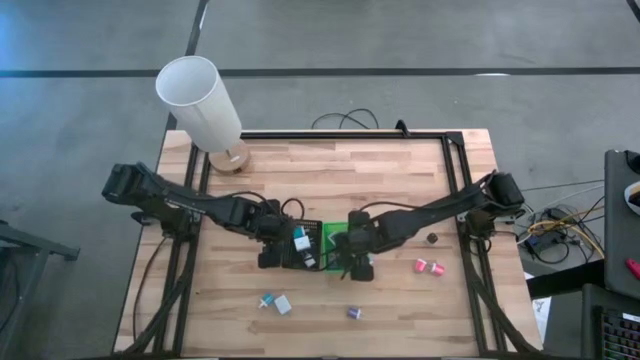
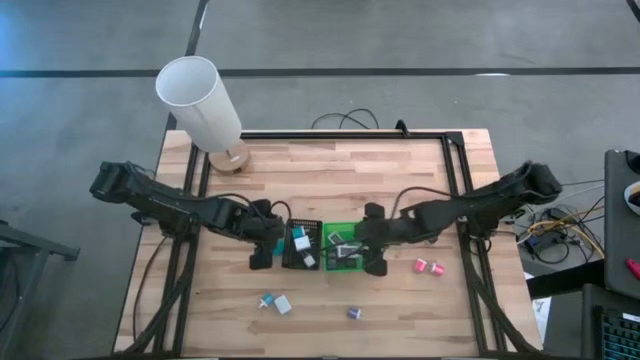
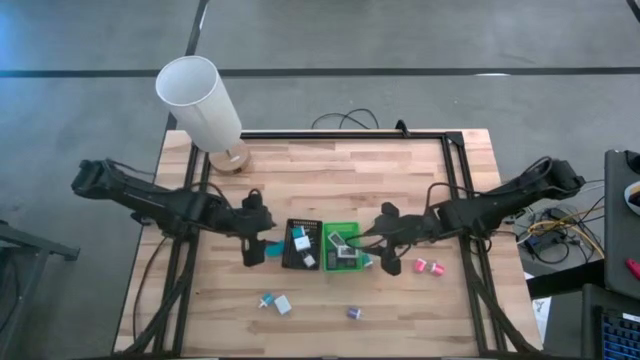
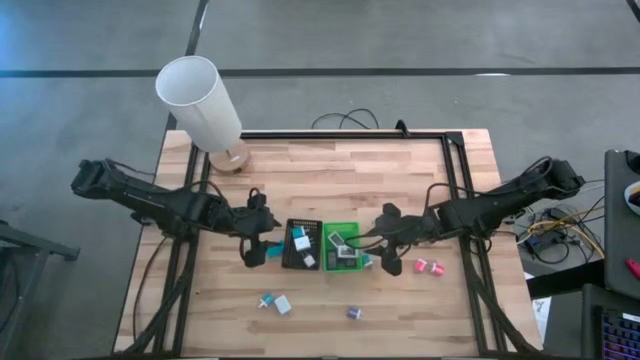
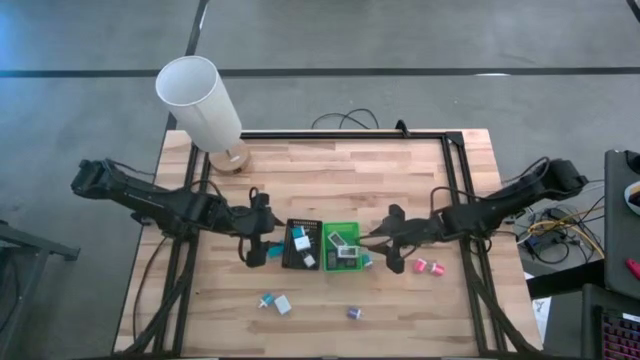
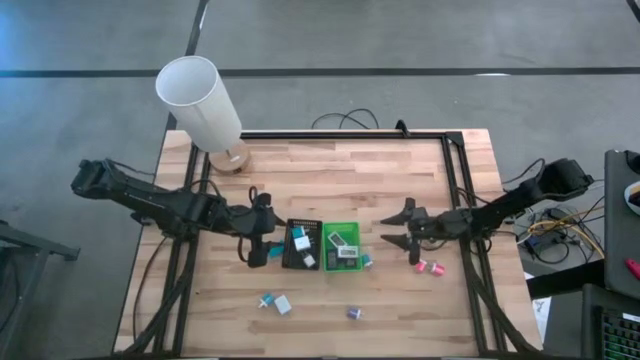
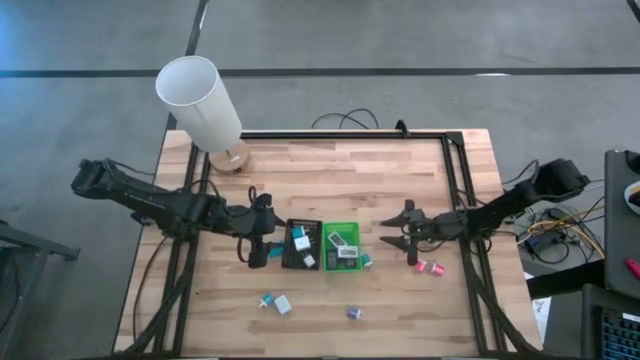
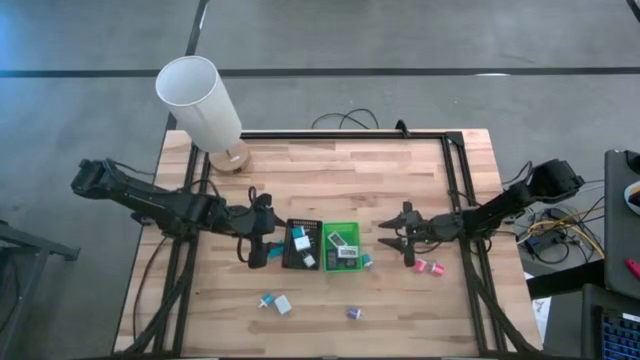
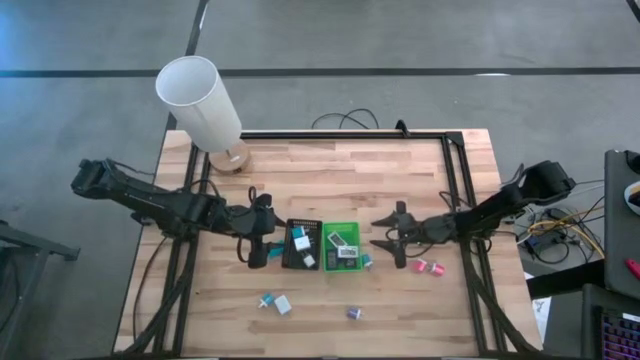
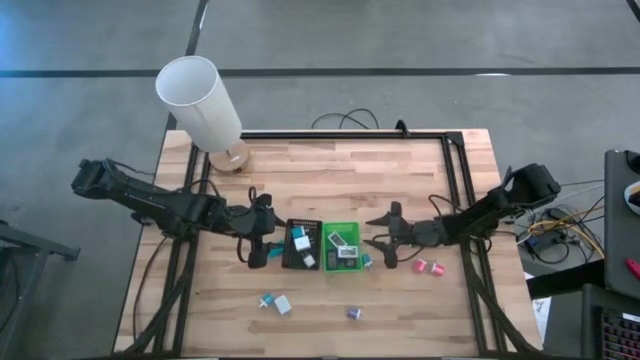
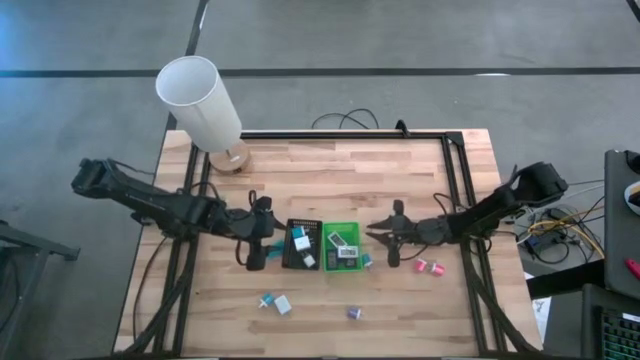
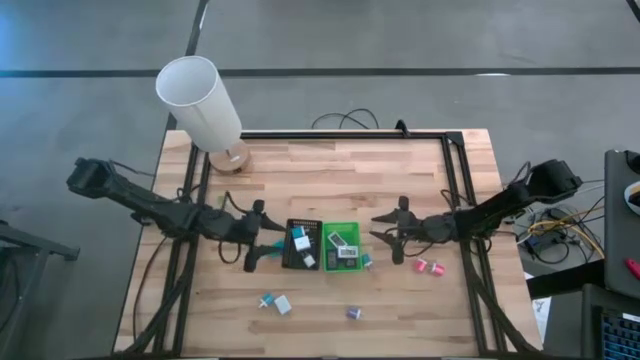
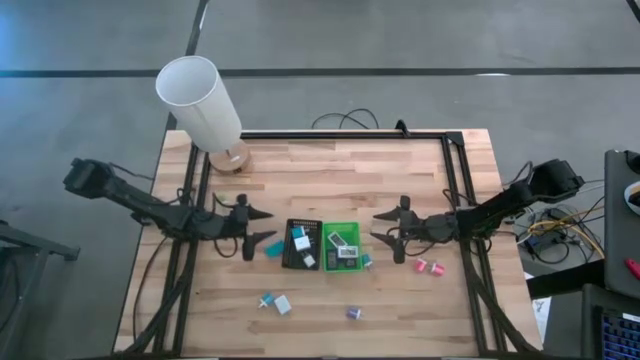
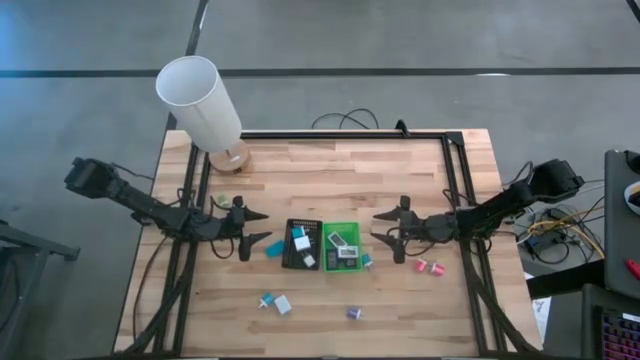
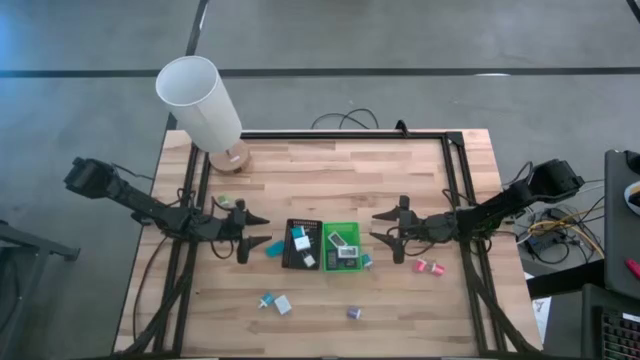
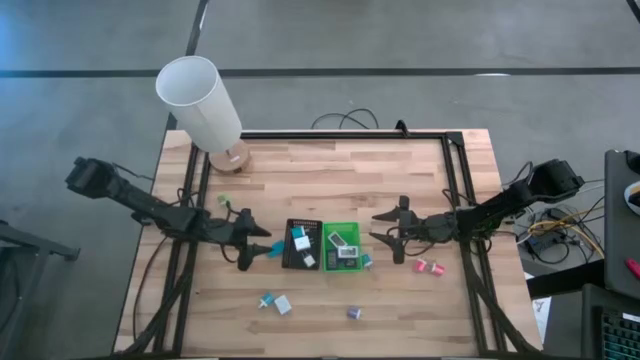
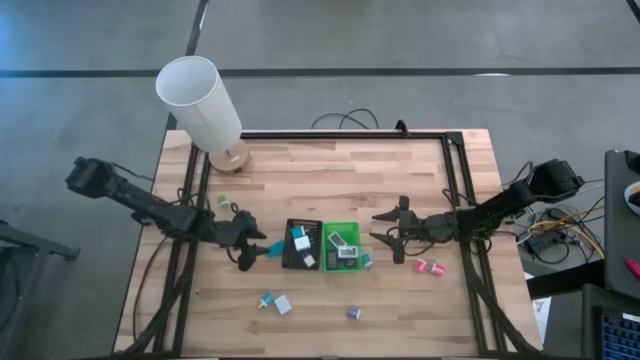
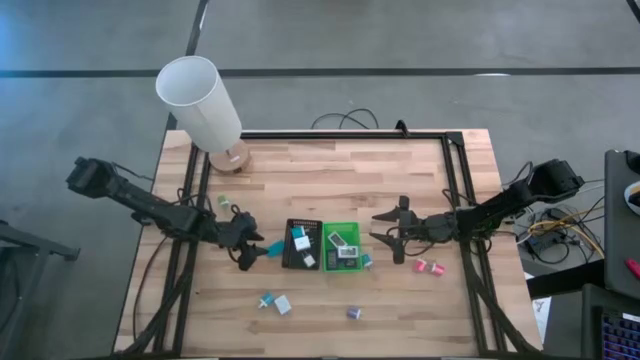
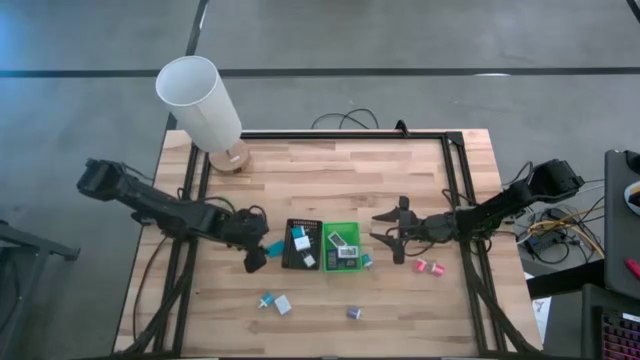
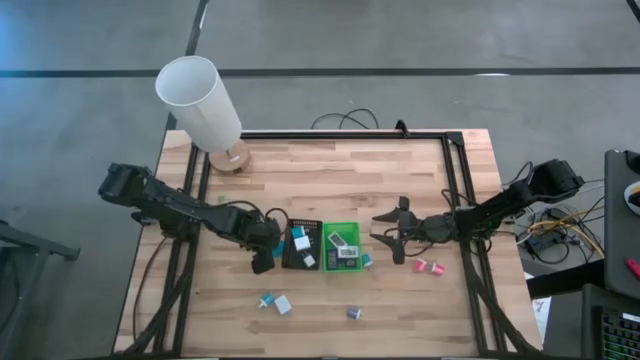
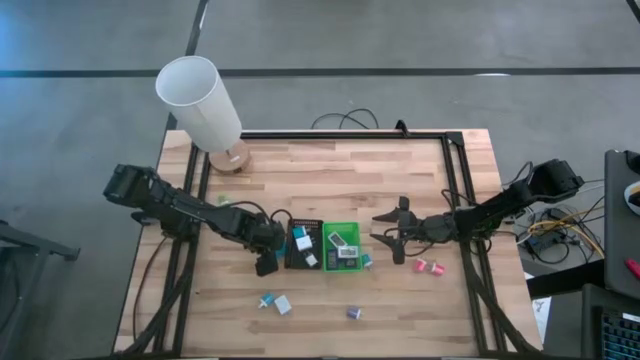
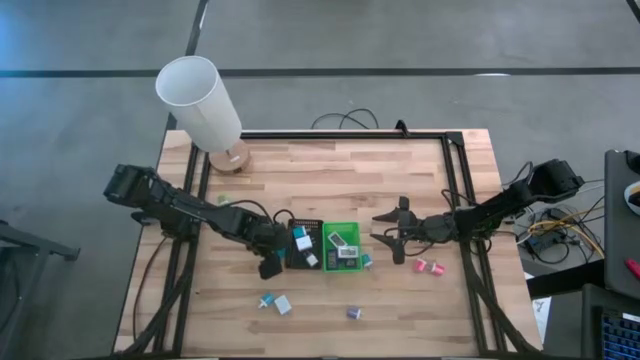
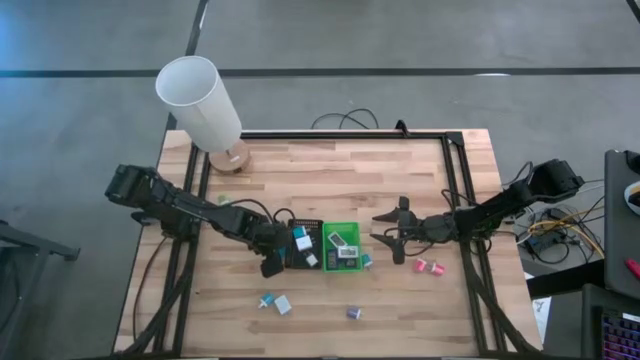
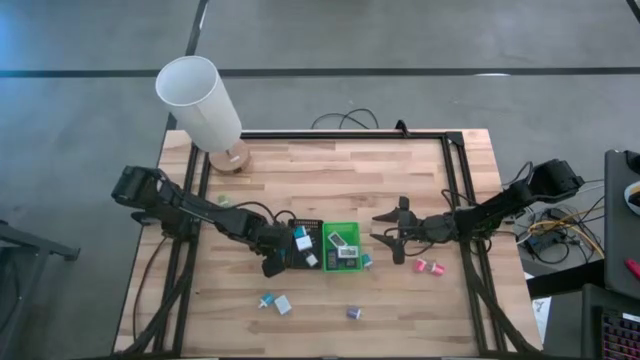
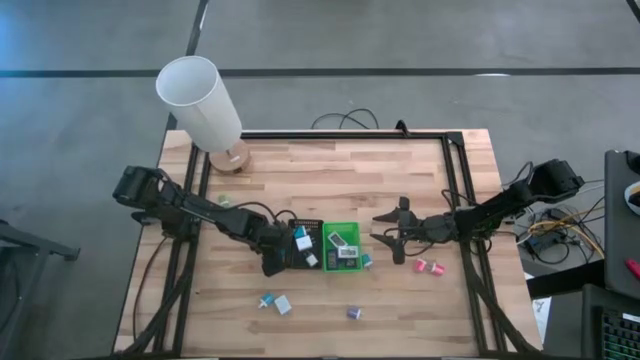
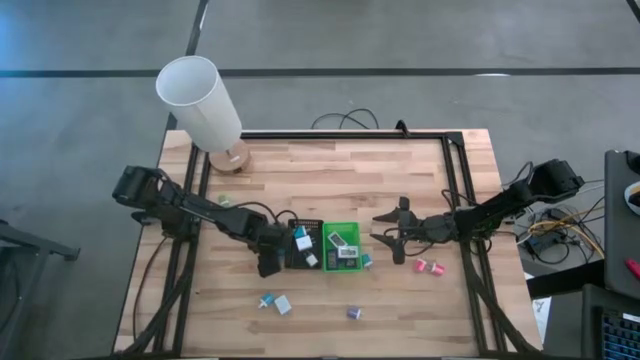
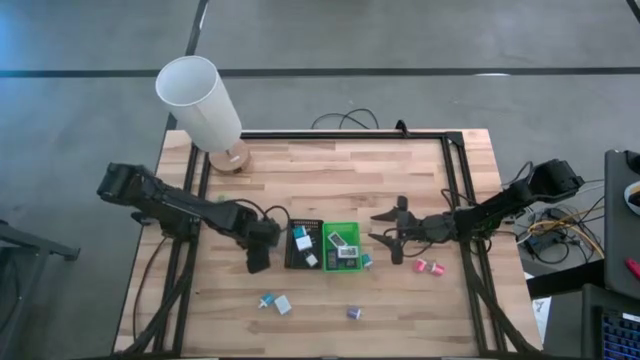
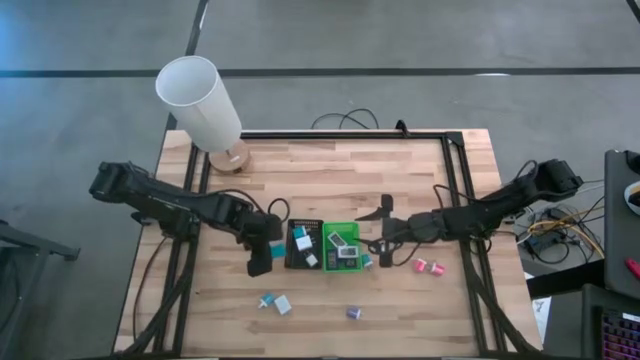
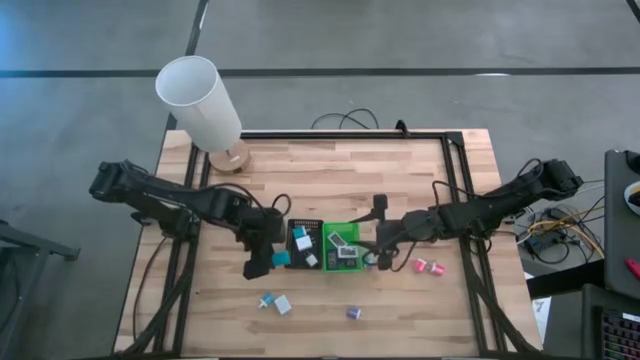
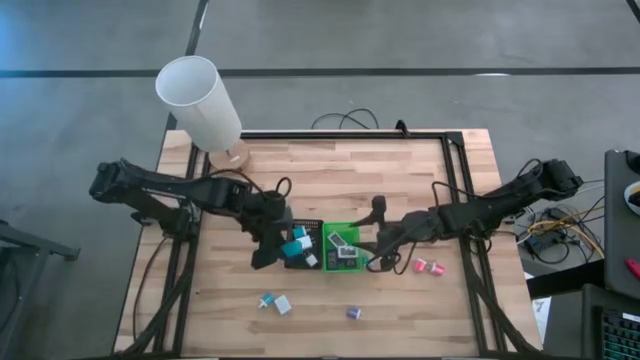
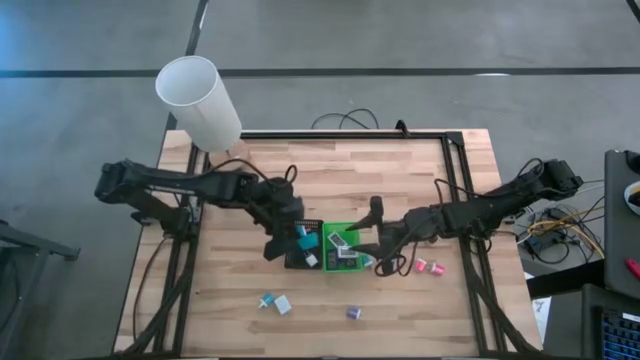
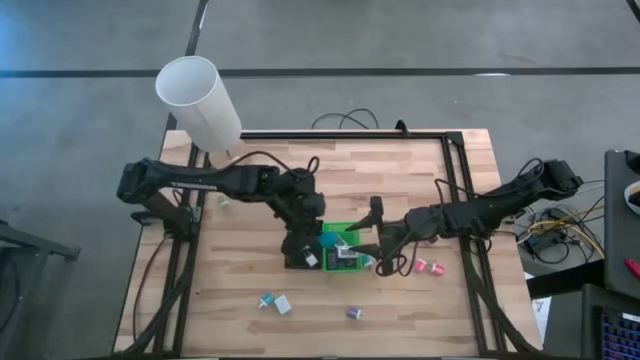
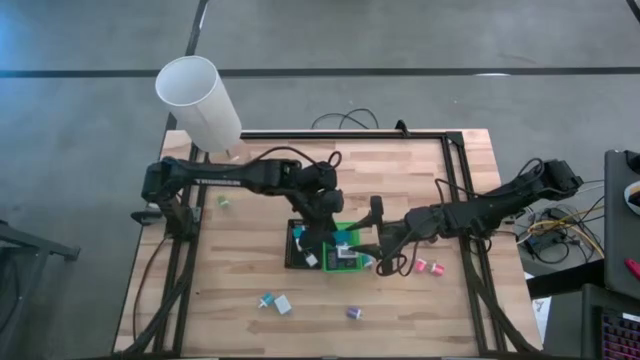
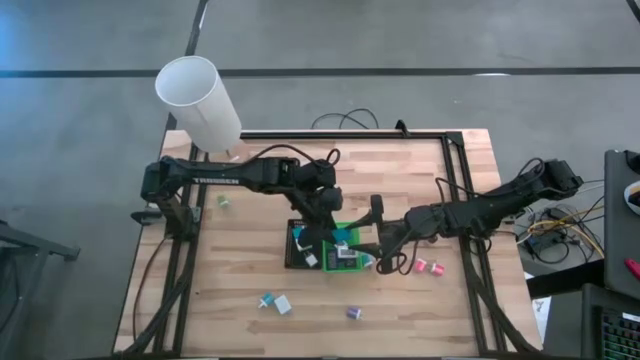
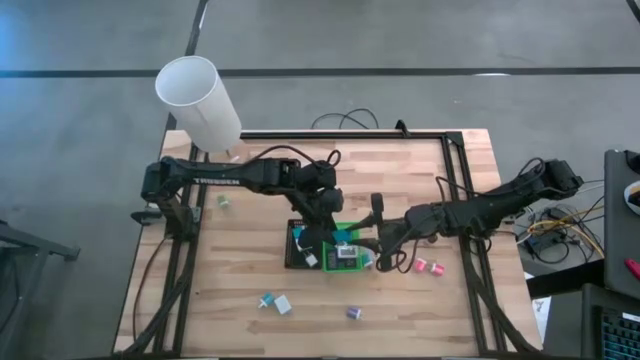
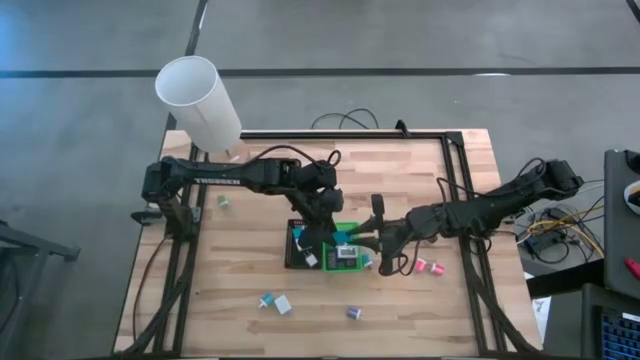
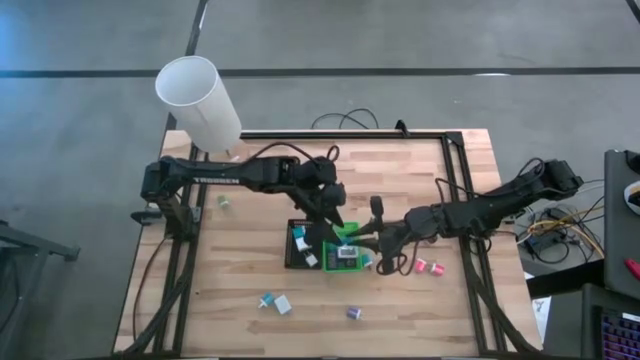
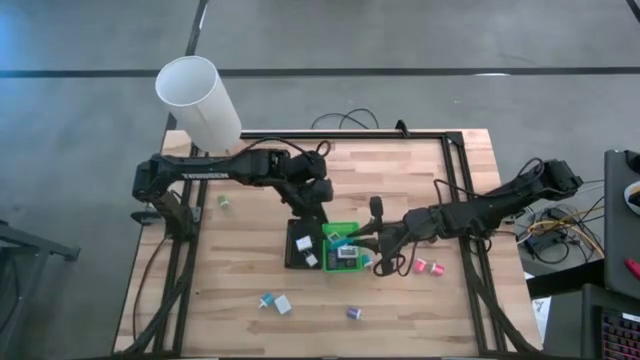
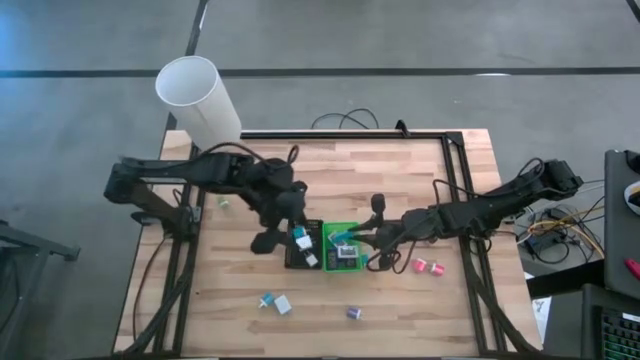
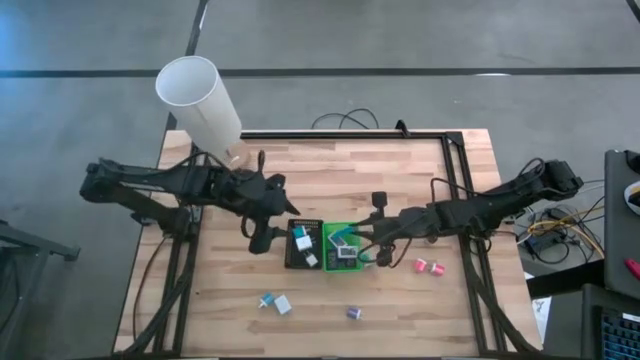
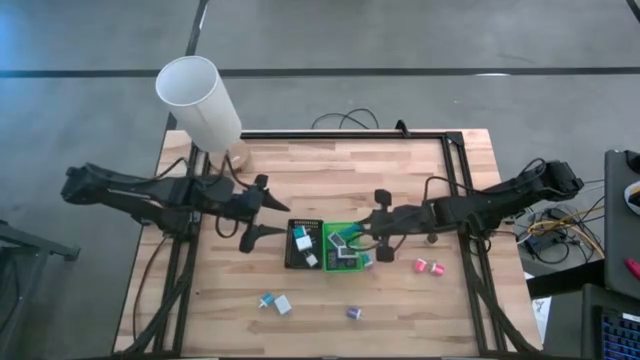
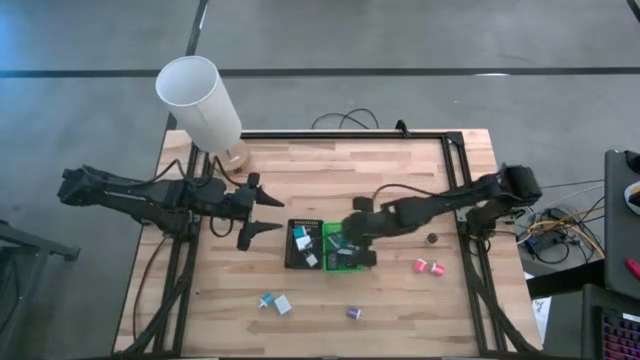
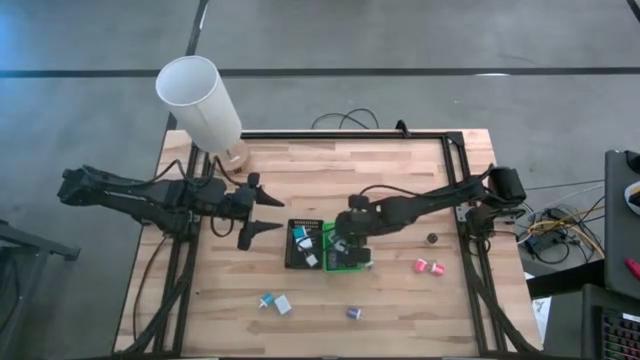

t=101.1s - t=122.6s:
Task: Pick & Place Office items
Put the blue timer into the green bin
